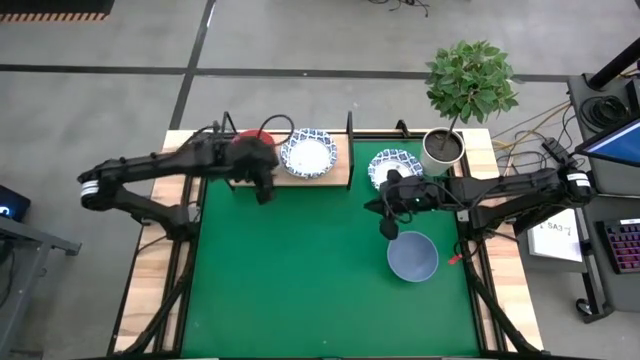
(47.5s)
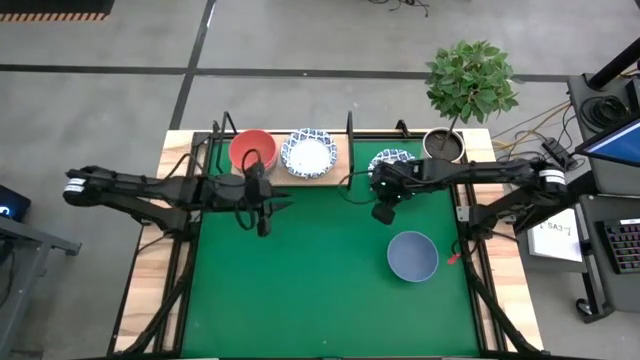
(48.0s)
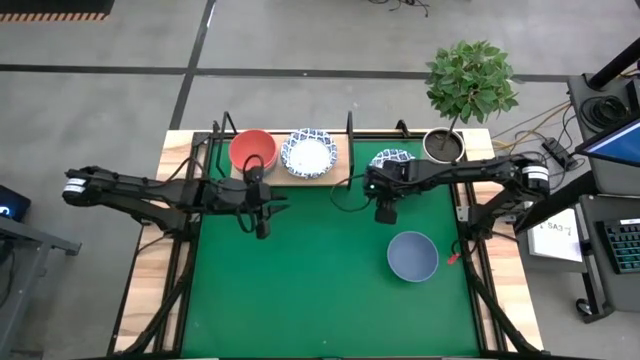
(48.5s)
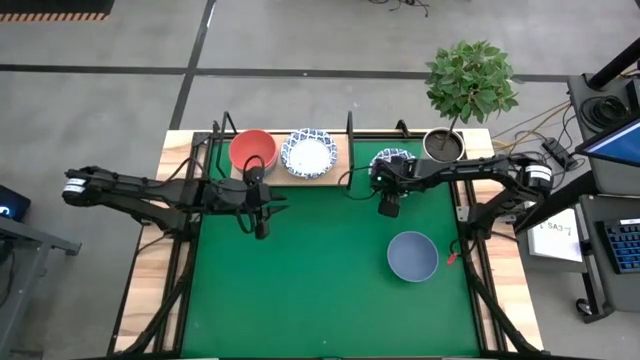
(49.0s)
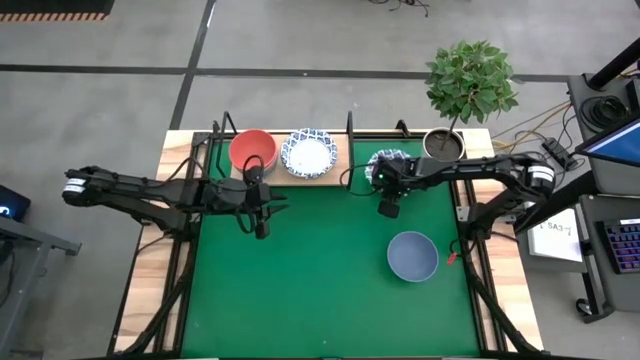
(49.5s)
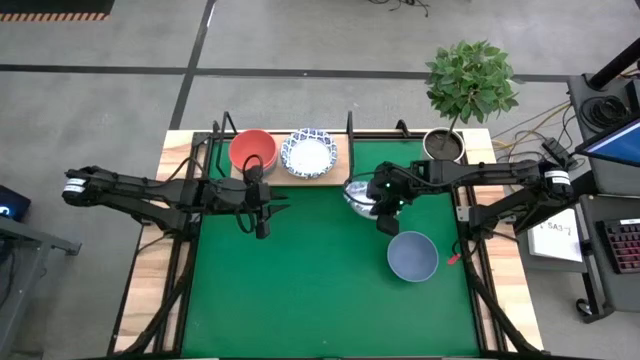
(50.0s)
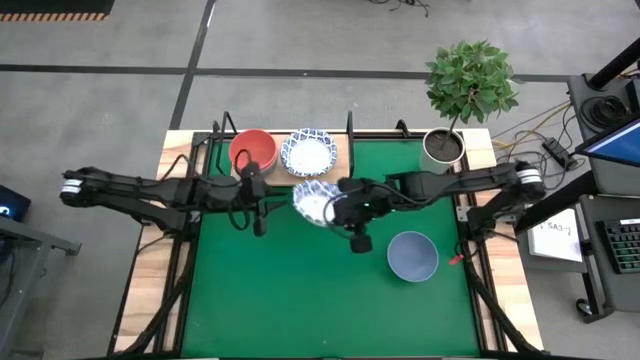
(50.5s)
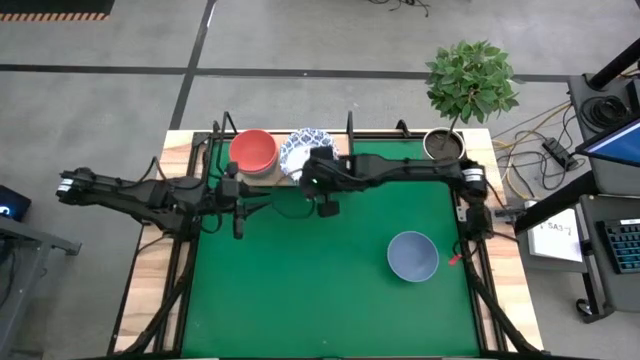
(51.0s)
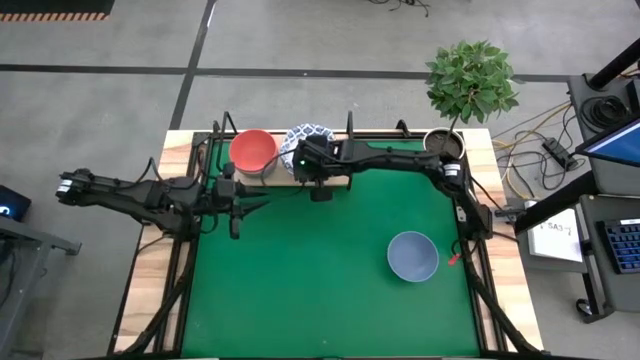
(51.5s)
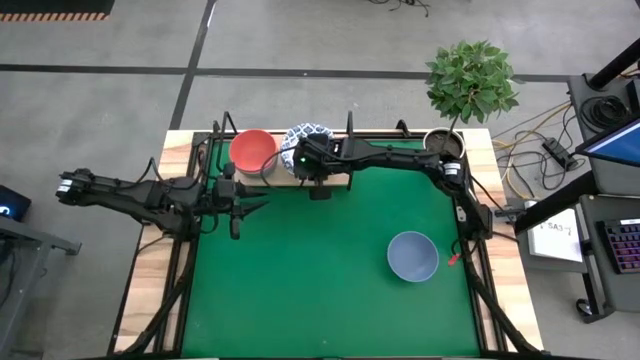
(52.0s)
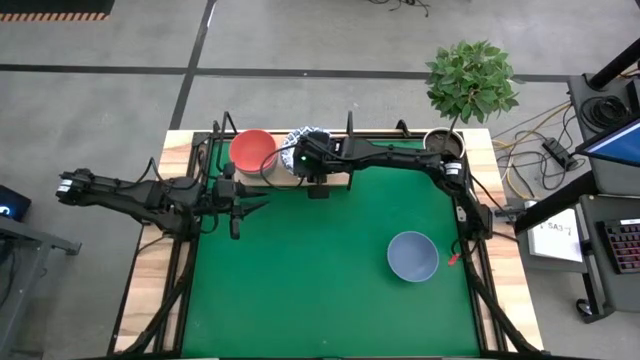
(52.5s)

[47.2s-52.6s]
Task: Place and stack bowls onto a shelf
Stack the white bowl on top of the white bowls on the shelf

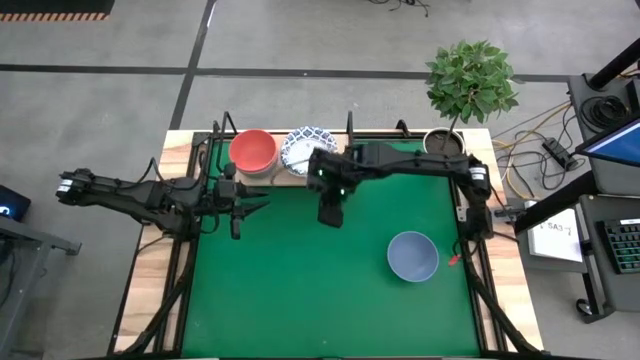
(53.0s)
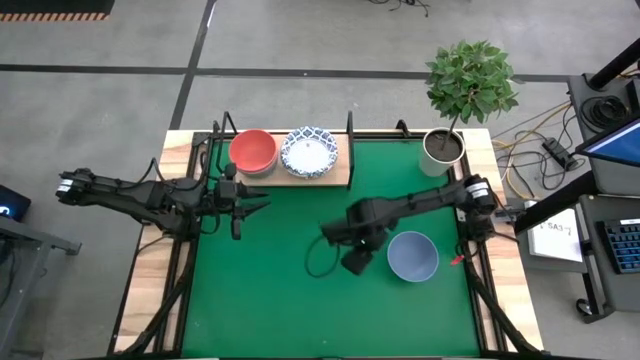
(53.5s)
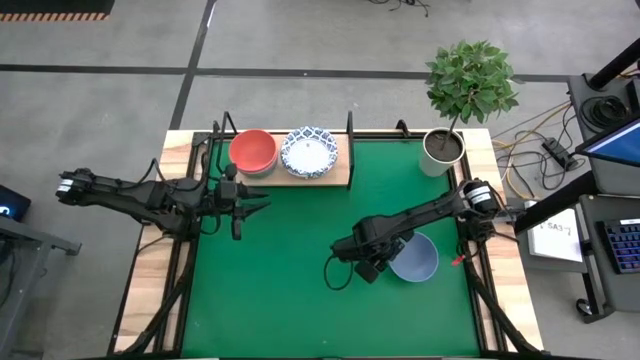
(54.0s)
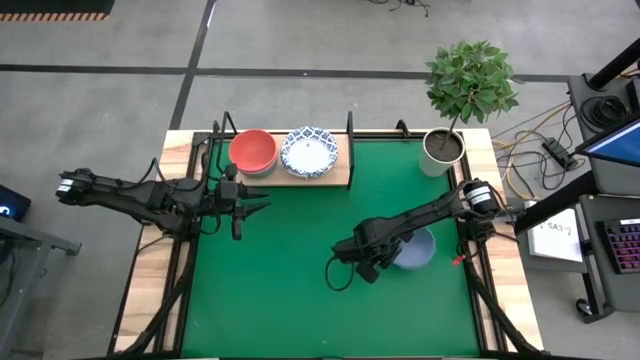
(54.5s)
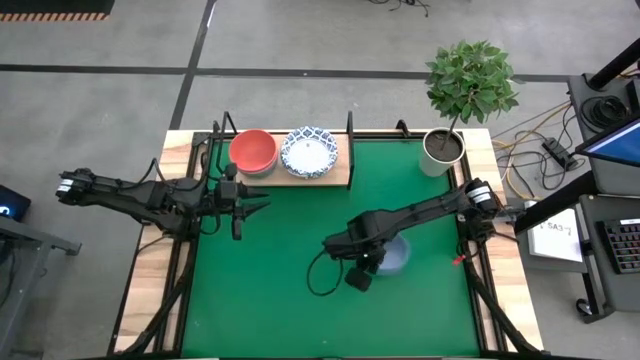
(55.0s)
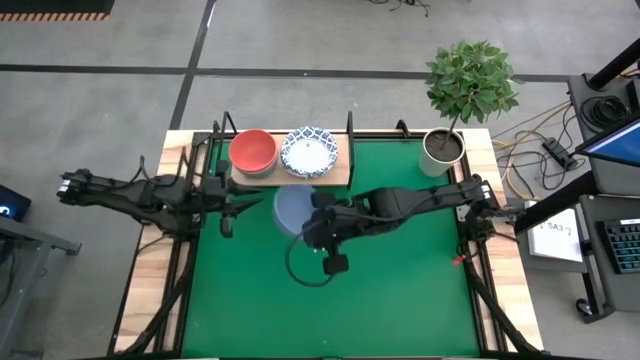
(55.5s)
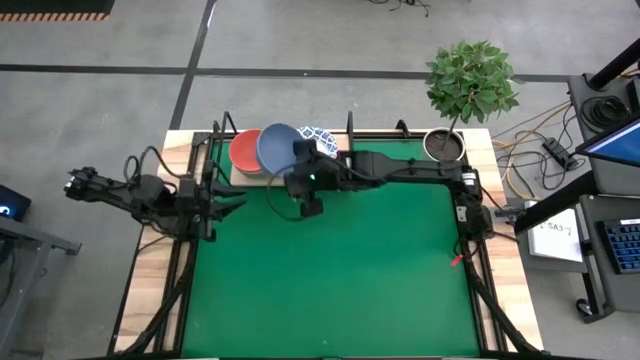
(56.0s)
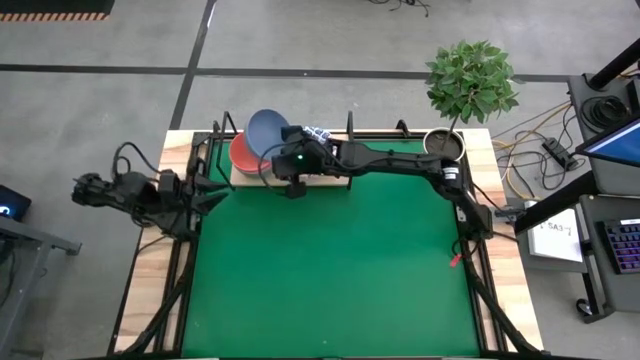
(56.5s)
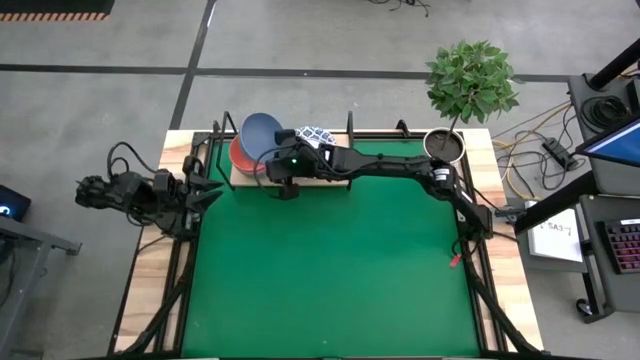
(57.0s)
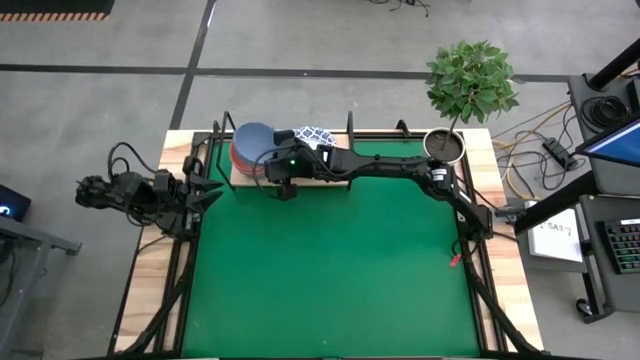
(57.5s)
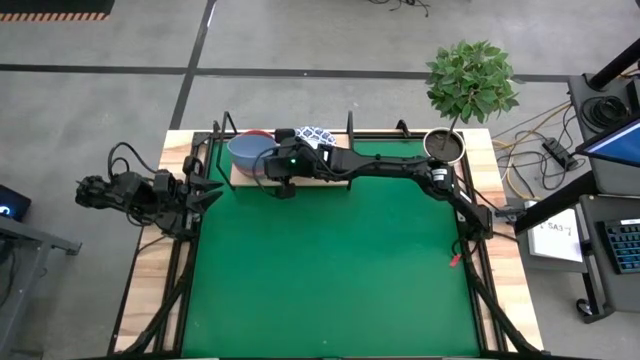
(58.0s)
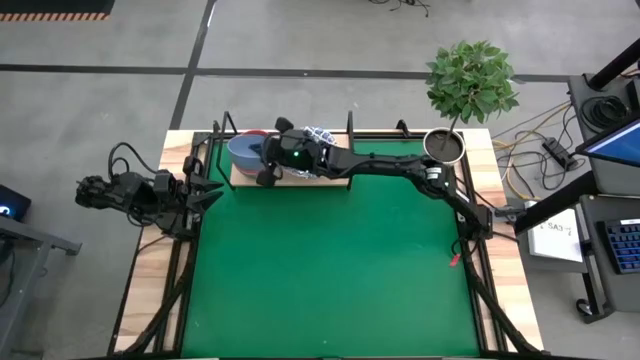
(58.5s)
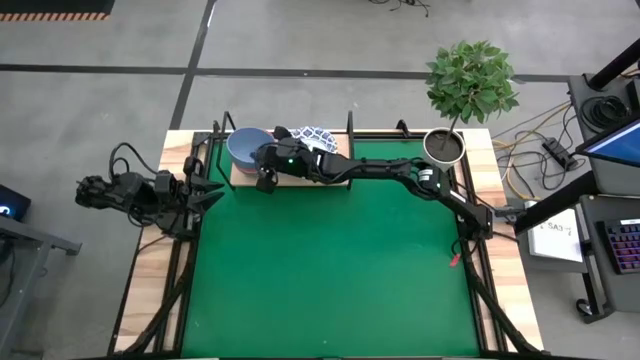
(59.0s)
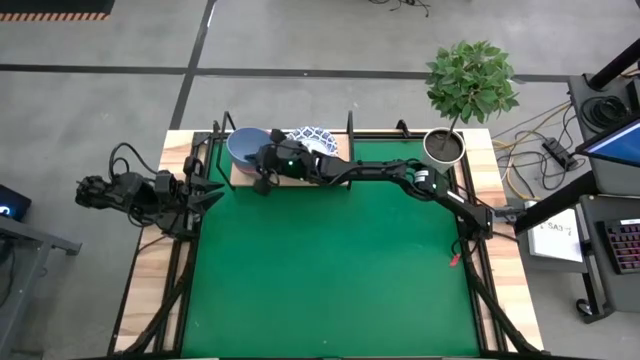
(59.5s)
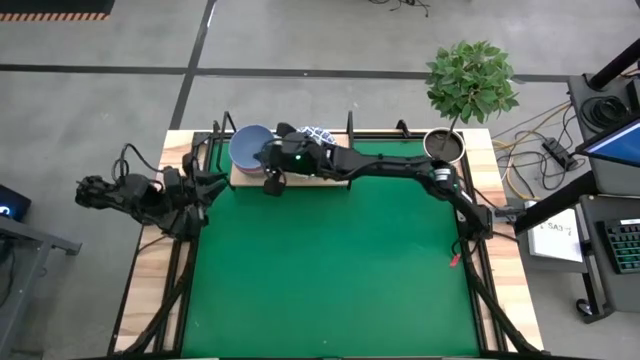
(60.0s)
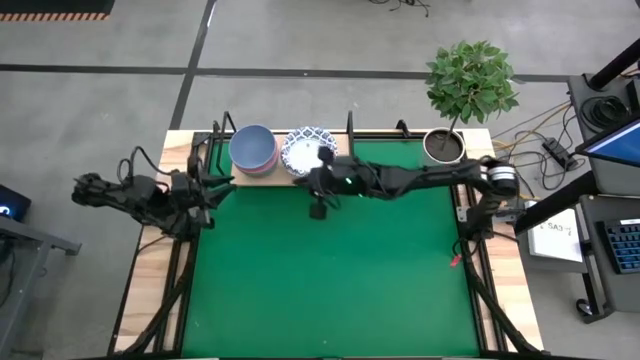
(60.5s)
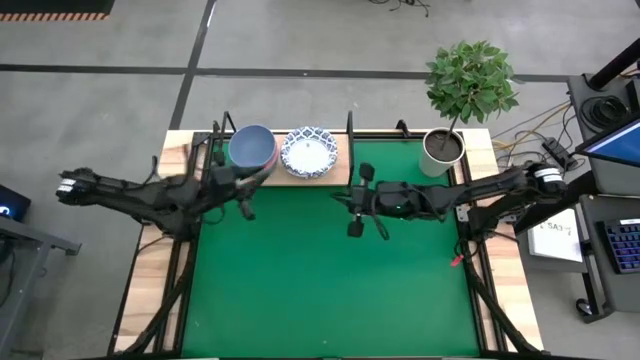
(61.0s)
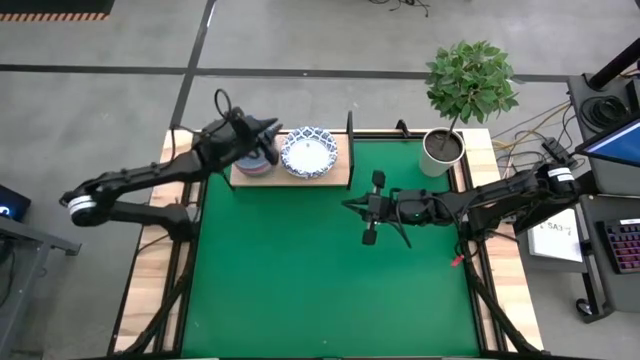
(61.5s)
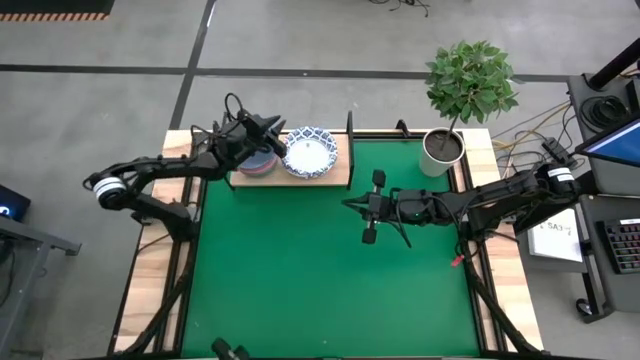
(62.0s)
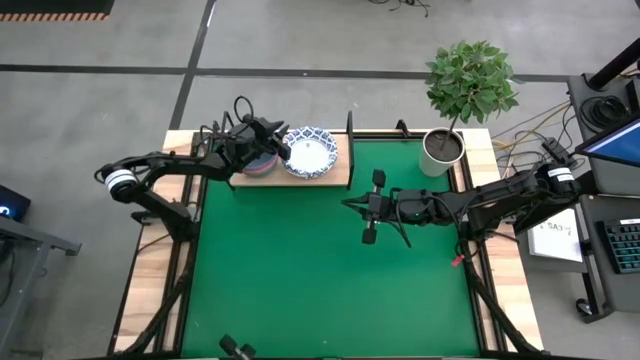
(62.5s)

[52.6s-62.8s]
Stack the blue bowl on top of the orange bowl on the shelf

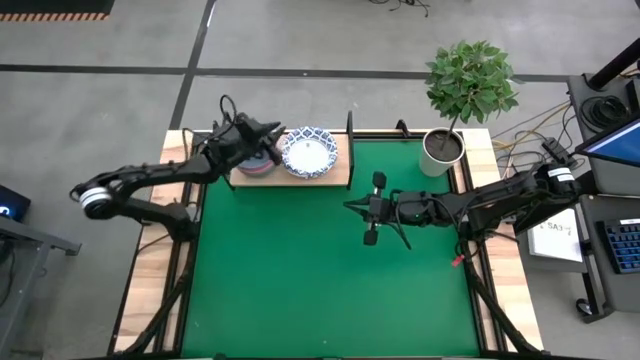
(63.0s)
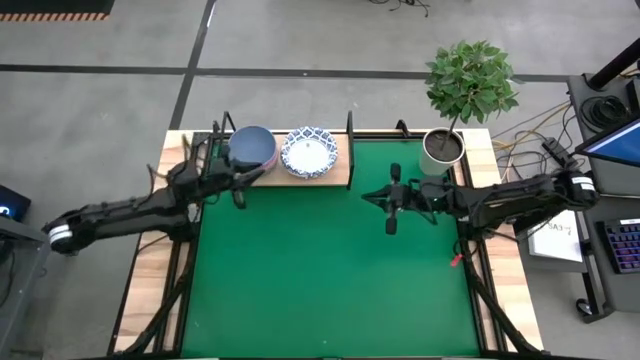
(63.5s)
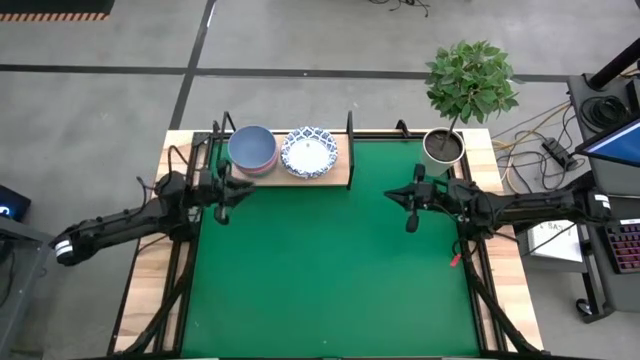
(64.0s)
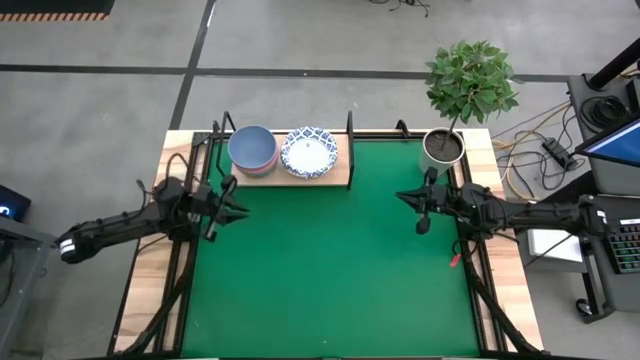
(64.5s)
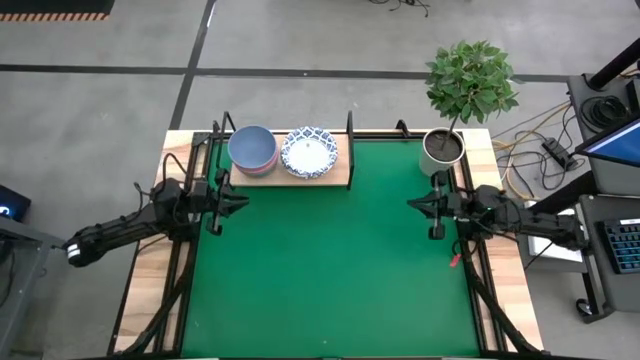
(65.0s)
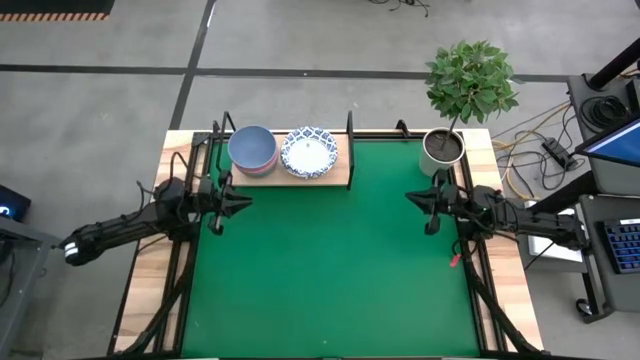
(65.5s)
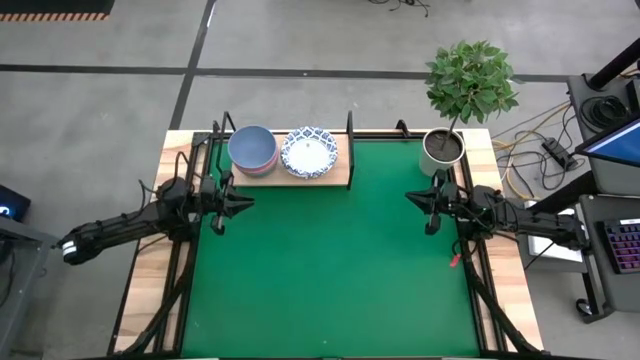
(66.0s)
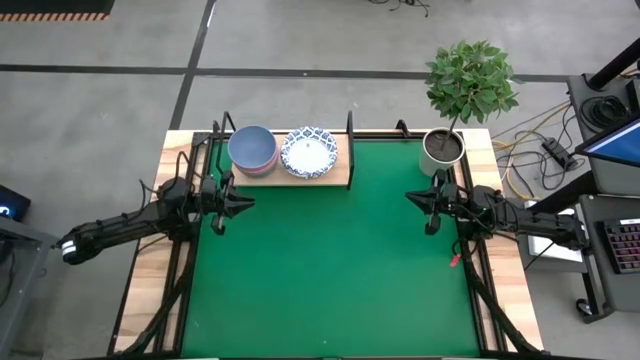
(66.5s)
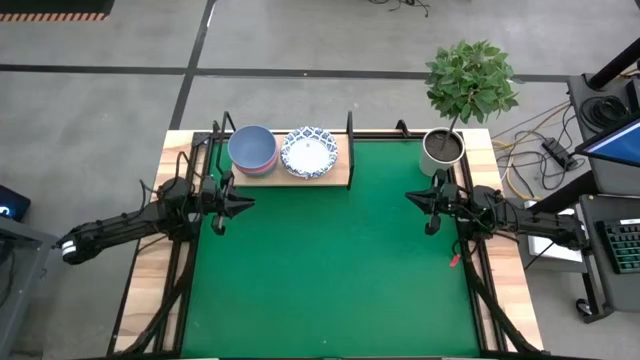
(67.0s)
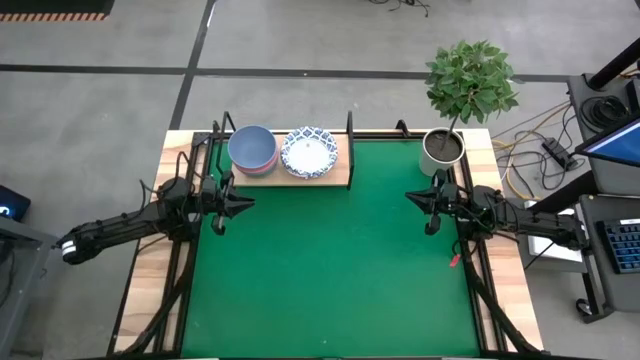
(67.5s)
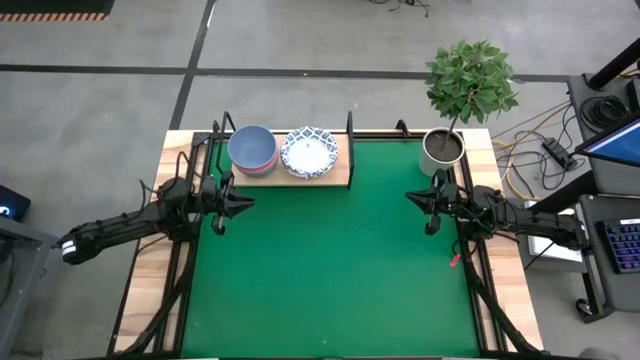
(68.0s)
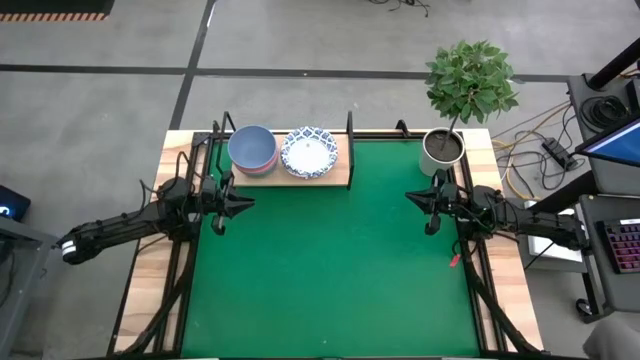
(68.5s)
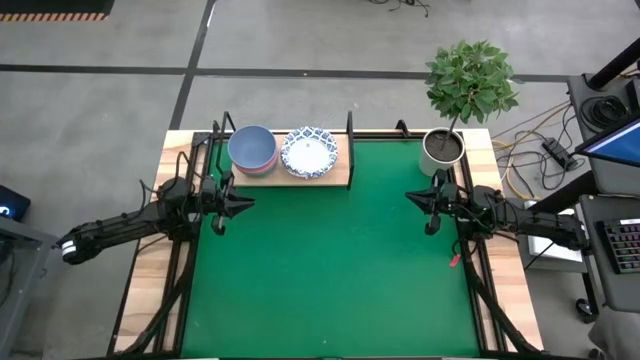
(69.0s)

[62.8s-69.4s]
Return to Home Position
